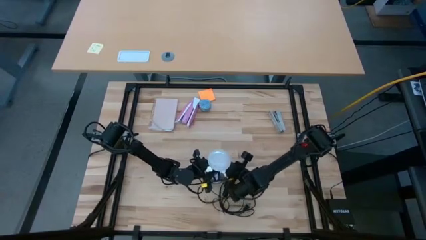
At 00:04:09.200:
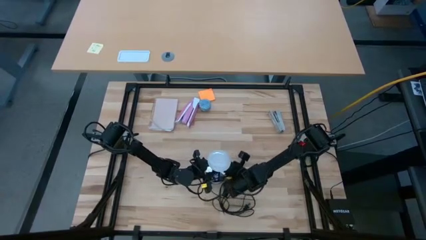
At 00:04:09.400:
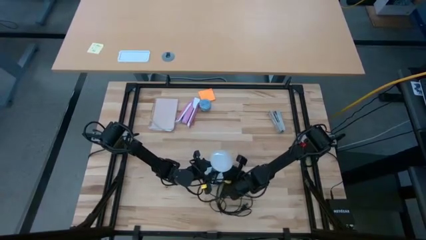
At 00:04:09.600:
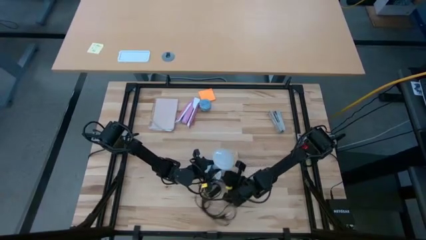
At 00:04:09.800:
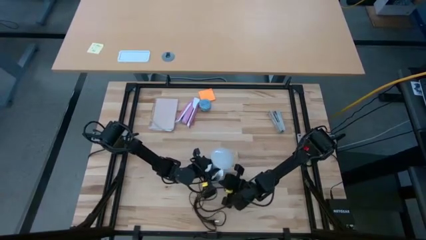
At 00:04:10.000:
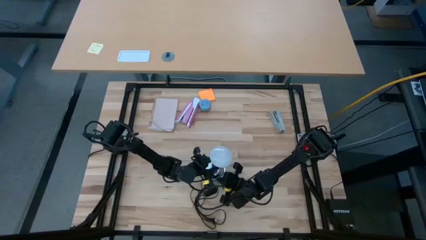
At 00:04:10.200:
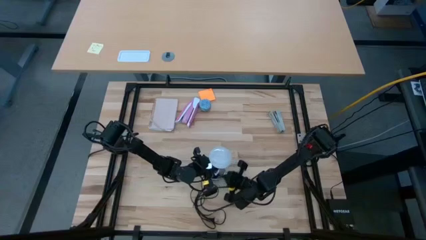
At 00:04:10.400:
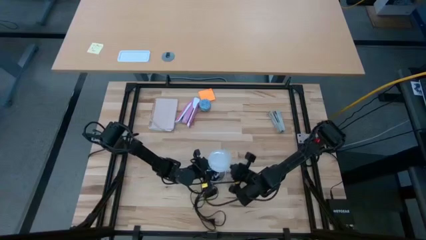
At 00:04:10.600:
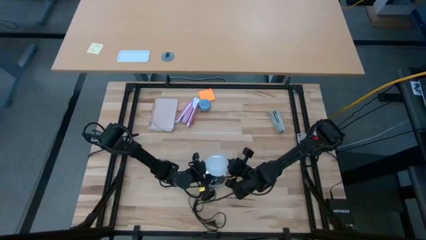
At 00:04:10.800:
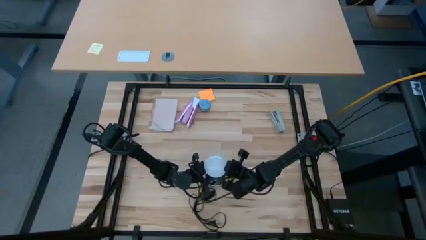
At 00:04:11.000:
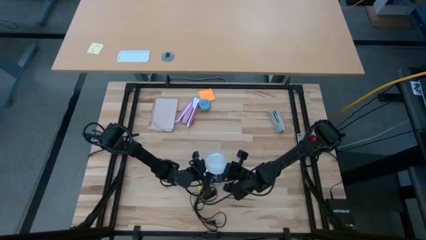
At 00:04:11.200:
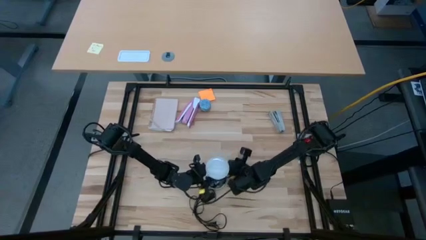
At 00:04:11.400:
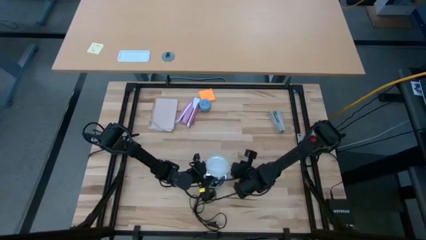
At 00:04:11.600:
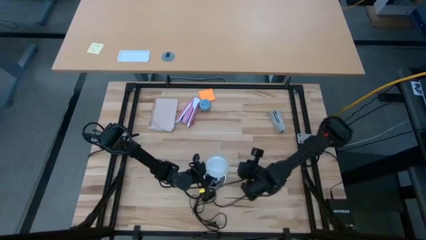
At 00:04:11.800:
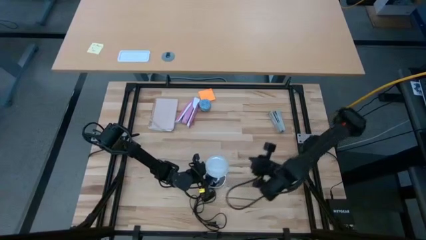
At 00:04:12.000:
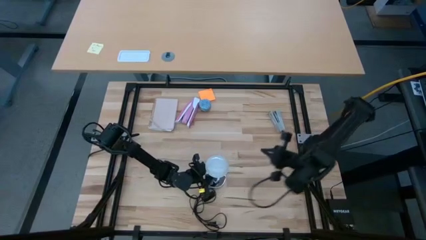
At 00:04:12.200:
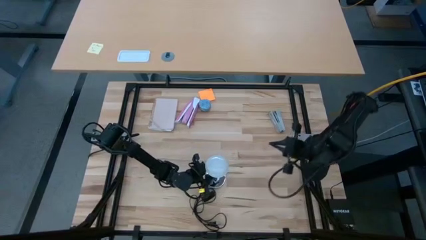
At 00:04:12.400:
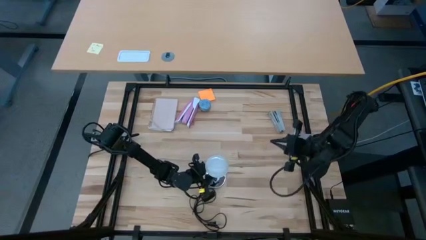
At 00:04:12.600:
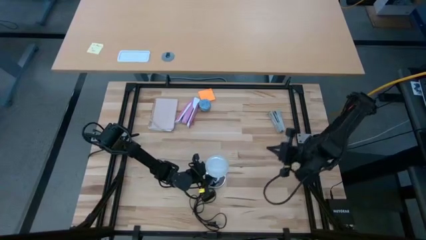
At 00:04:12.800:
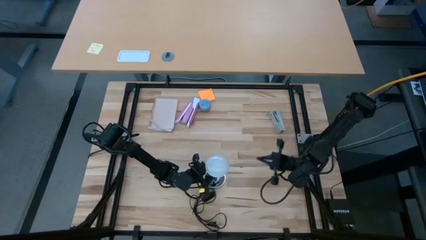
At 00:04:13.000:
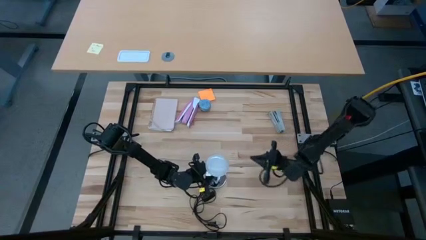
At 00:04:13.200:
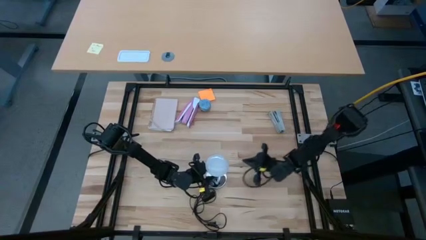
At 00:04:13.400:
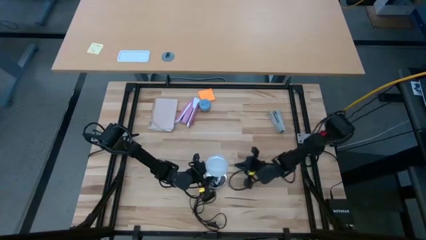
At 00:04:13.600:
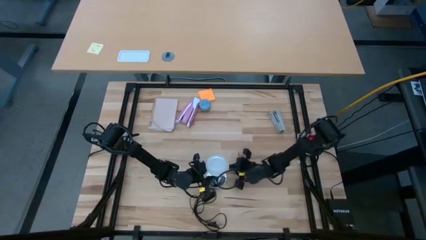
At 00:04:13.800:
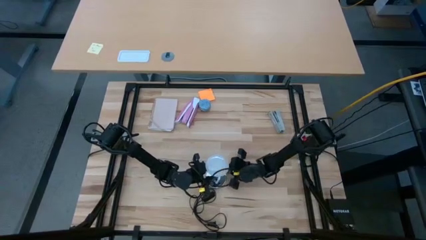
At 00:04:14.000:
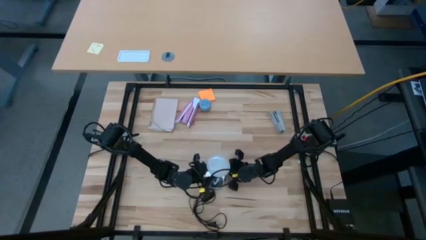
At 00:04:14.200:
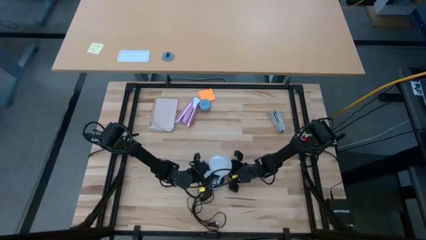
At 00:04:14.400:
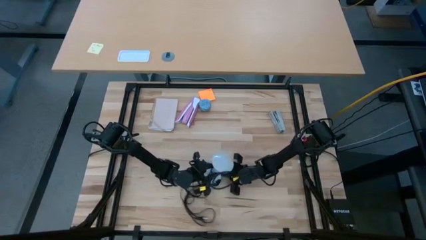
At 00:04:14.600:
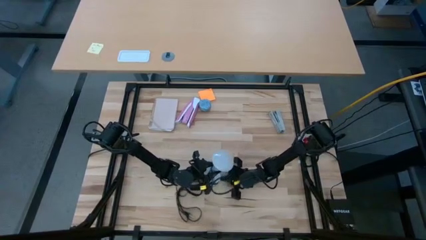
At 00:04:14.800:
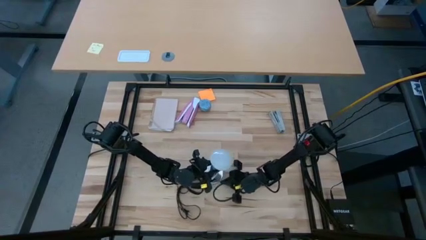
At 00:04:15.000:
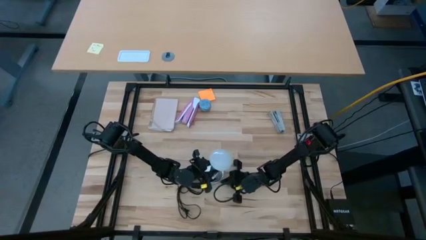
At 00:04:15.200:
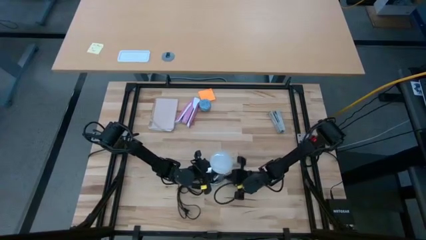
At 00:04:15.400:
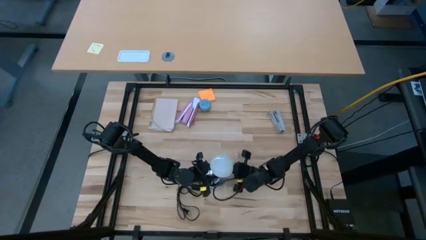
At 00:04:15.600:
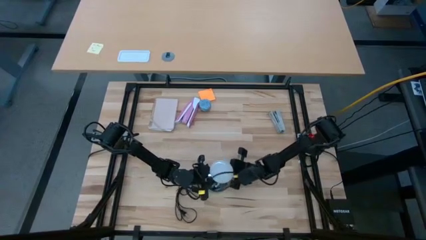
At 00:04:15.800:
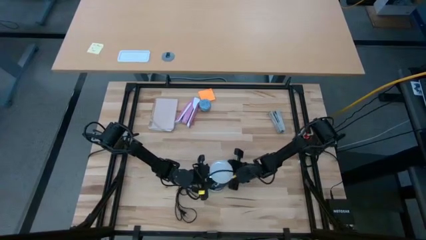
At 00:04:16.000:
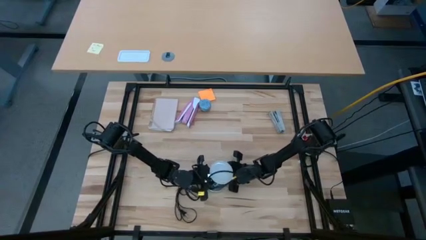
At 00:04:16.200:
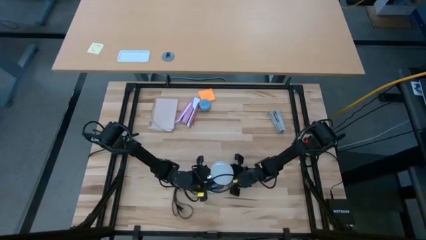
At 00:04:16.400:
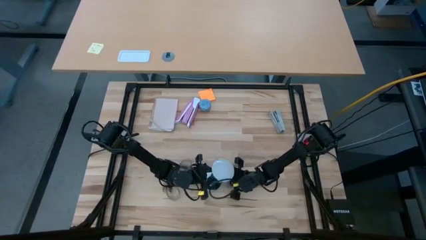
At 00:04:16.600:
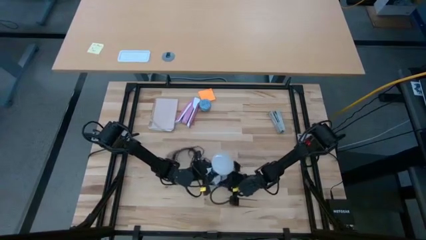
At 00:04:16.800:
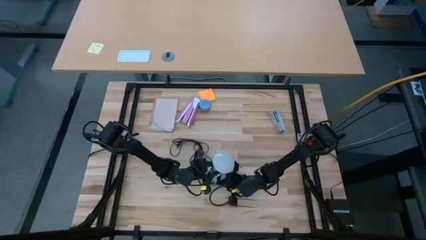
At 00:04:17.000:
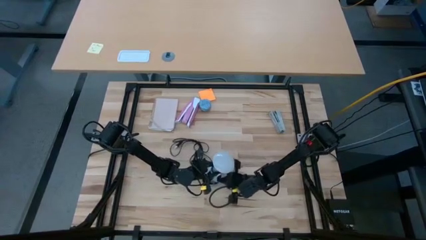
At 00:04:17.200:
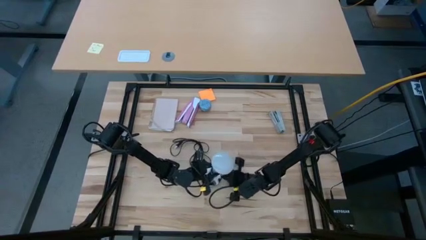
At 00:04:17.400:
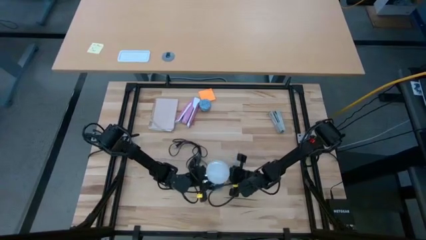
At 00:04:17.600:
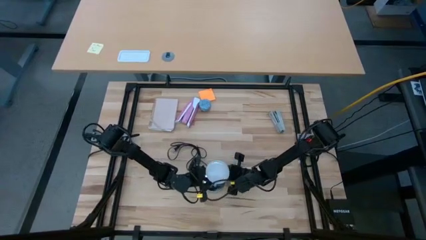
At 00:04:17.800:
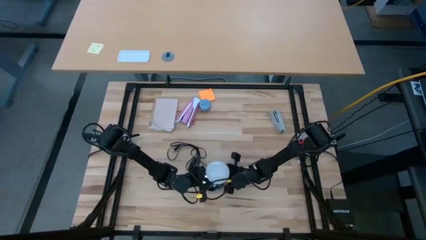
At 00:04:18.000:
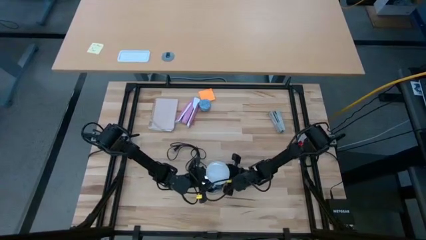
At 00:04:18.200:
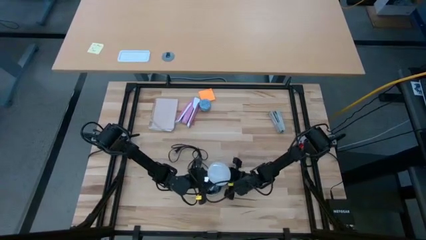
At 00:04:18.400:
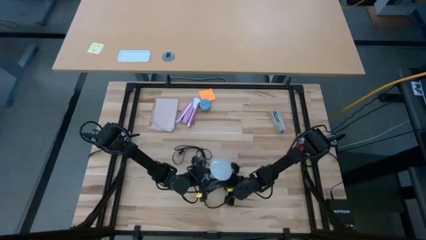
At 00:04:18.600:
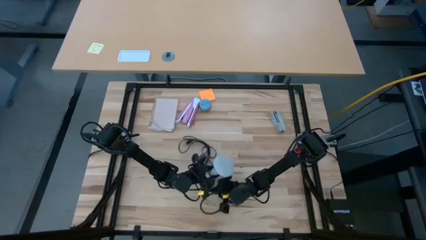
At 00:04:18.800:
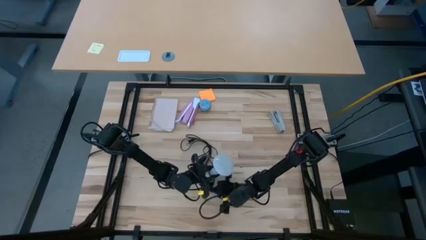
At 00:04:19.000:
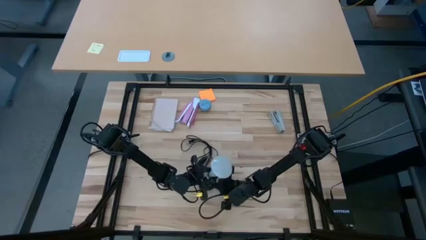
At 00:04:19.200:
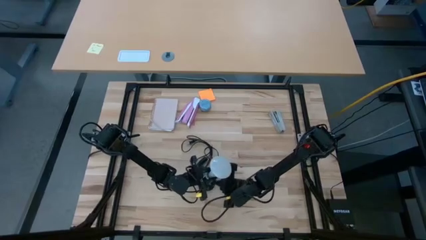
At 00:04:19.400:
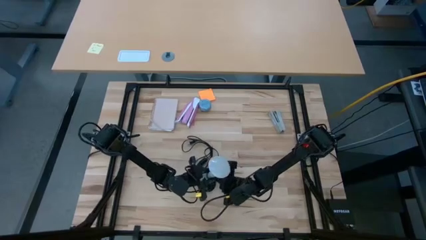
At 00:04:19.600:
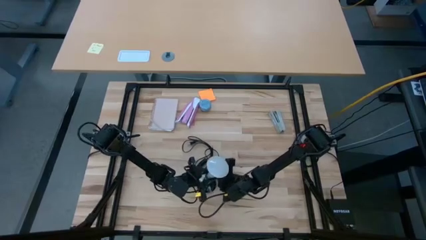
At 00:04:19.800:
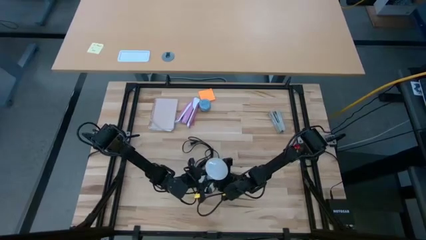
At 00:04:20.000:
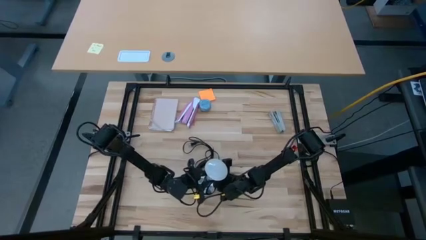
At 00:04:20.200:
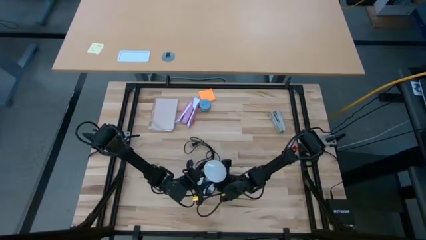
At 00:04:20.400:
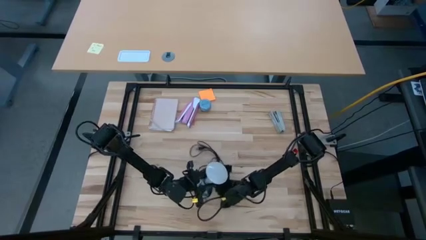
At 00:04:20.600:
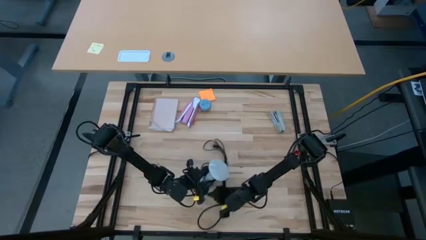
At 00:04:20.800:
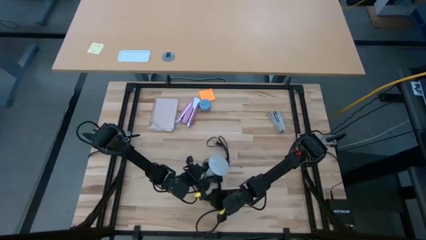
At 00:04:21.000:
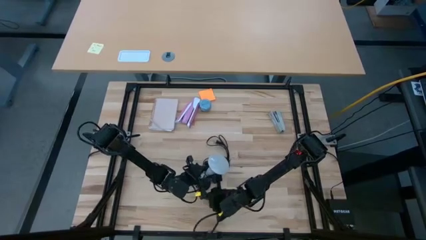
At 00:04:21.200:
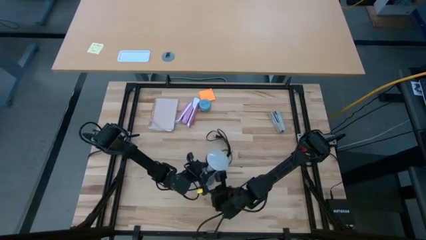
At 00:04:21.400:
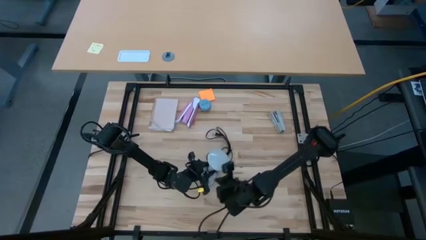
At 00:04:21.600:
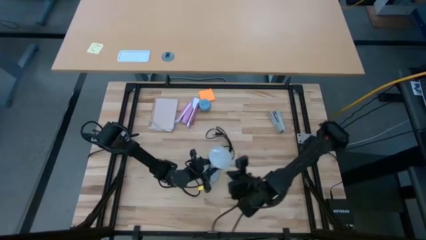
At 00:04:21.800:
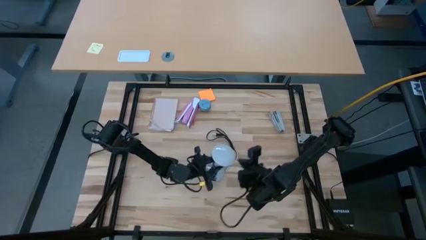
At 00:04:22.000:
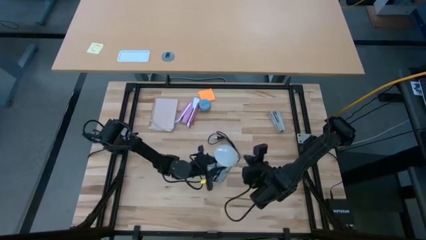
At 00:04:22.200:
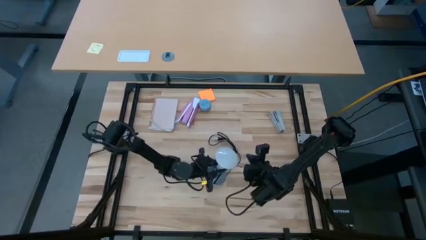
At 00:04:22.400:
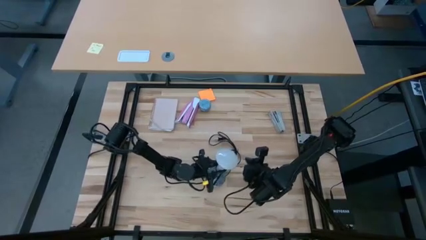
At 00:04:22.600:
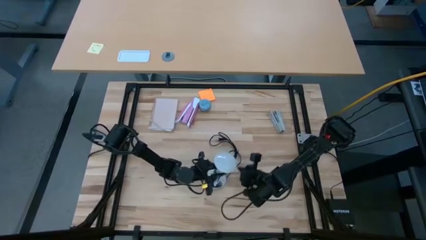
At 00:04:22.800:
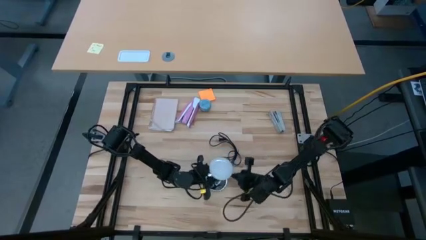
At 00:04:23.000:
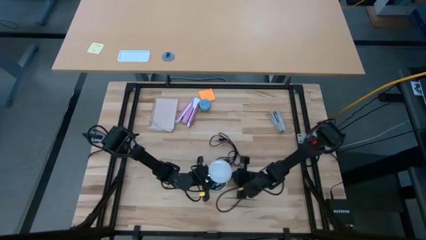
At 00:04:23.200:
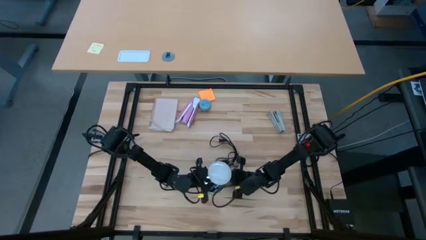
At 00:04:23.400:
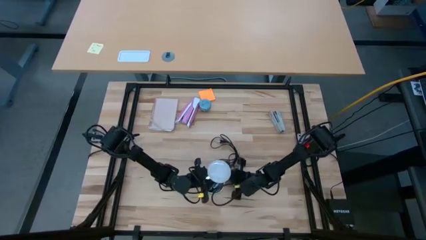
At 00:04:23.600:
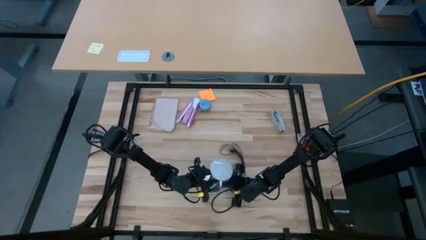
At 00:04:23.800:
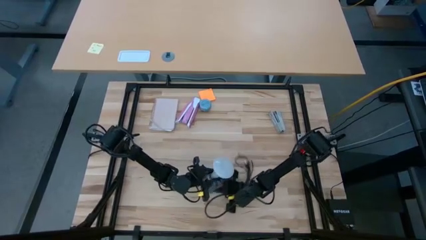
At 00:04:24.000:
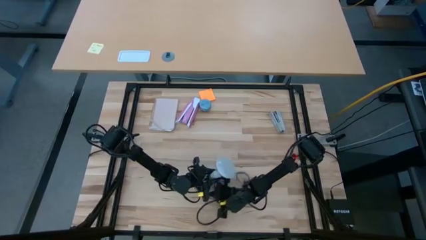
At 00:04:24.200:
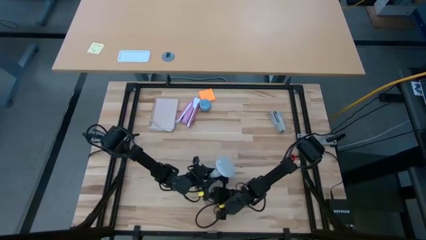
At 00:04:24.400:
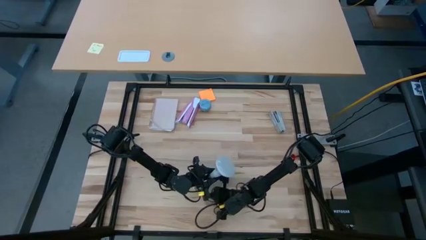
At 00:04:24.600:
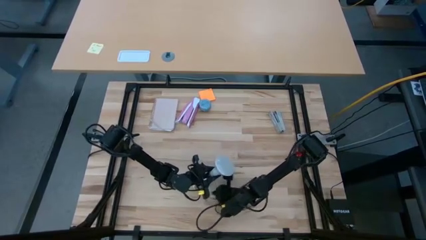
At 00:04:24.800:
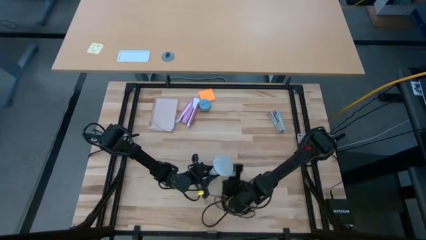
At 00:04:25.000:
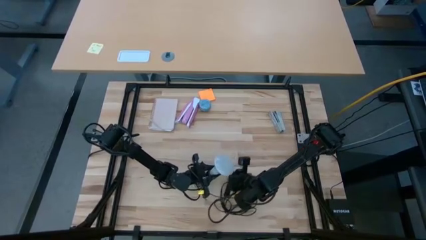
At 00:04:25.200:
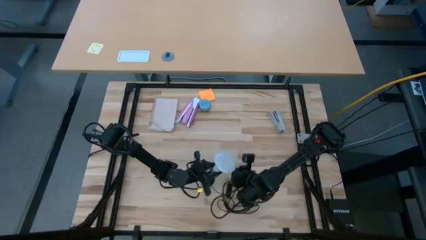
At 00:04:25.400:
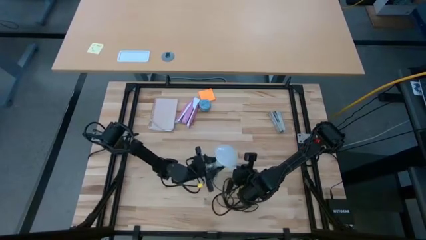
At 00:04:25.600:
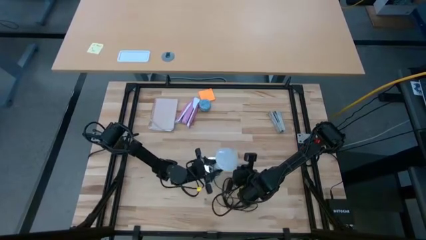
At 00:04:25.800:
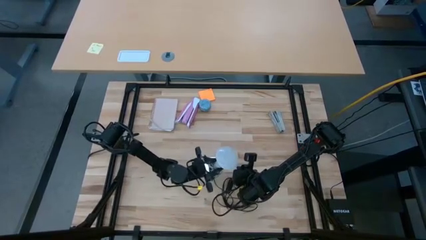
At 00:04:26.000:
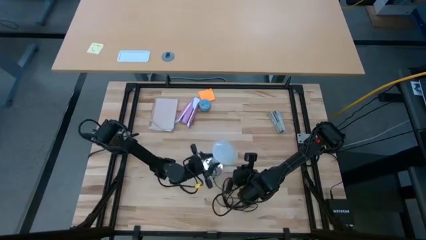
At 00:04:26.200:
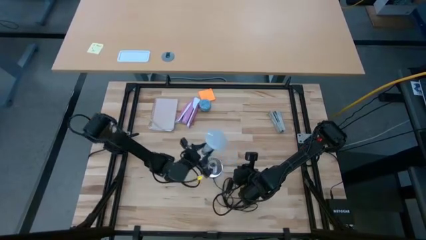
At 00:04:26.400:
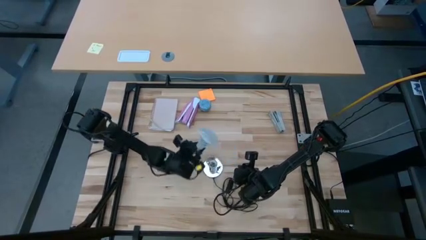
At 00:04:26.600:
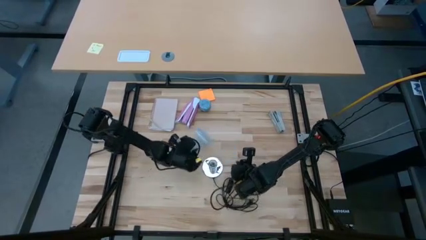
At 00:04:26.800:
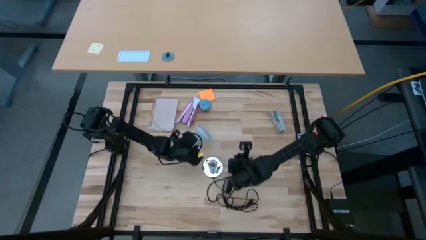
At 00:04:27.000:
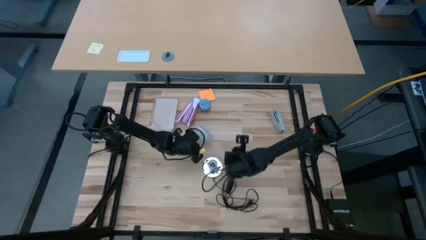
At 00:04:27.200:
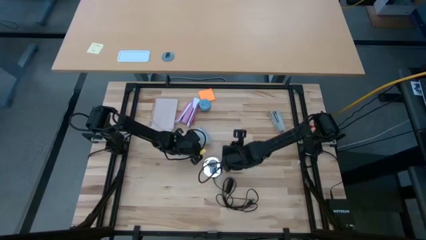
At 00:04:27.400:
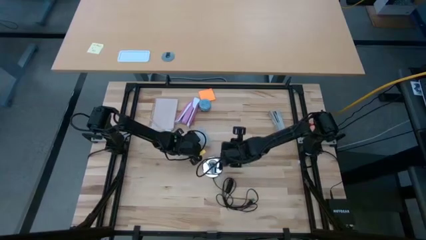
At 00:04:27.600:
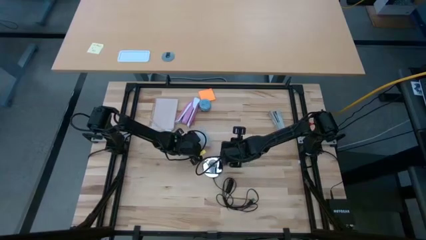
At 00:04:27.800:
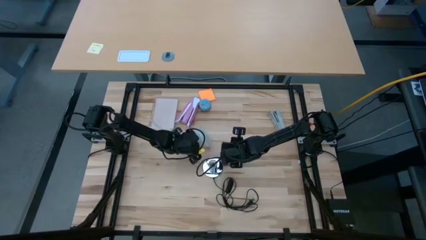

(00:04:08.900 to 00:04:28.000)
Task: Screw lightbulb
Remove the lightbulb from the lamp
